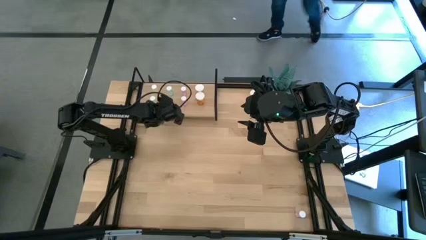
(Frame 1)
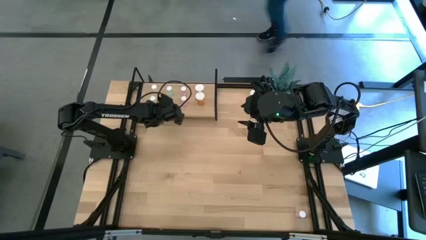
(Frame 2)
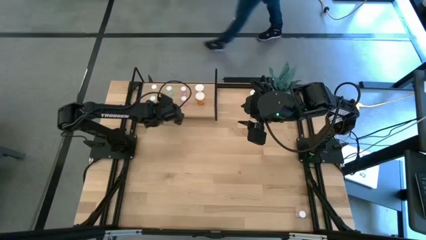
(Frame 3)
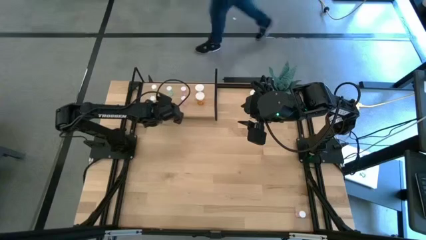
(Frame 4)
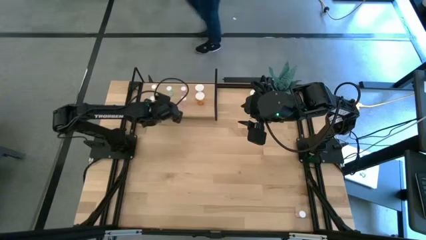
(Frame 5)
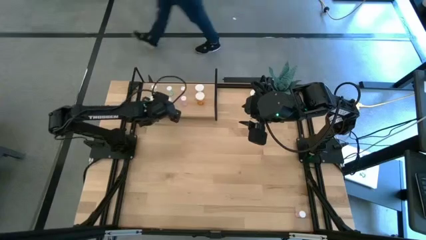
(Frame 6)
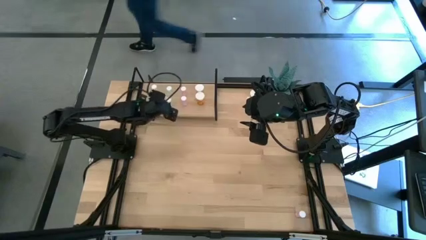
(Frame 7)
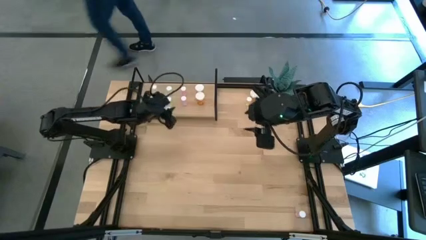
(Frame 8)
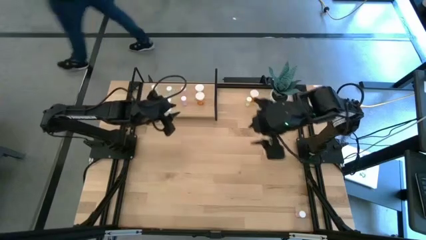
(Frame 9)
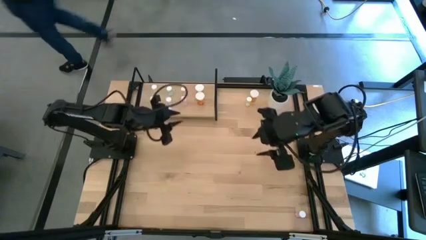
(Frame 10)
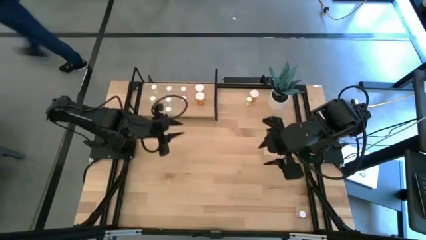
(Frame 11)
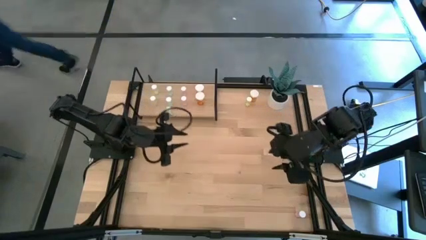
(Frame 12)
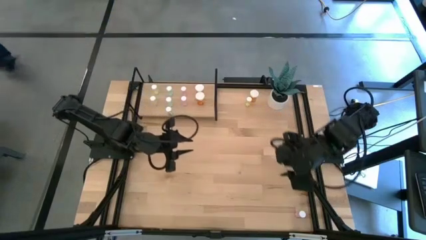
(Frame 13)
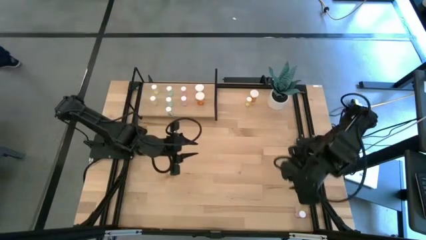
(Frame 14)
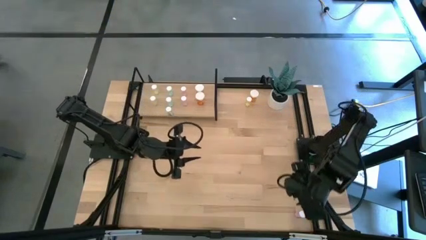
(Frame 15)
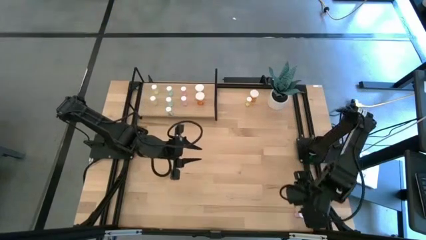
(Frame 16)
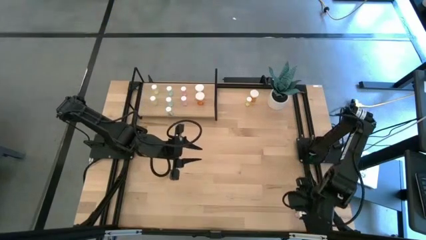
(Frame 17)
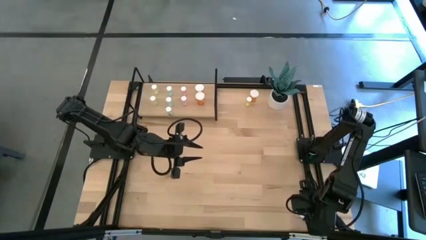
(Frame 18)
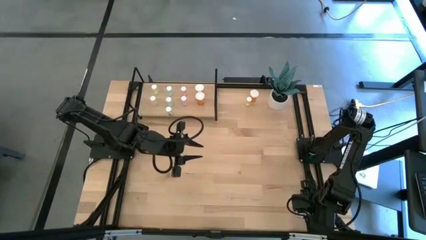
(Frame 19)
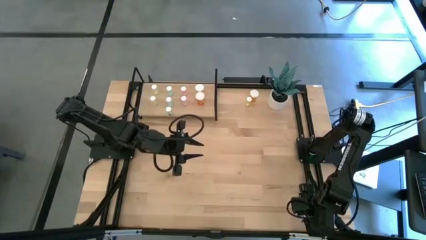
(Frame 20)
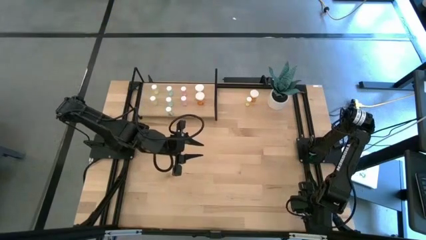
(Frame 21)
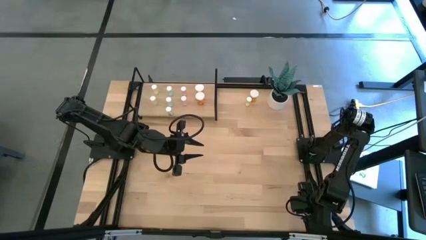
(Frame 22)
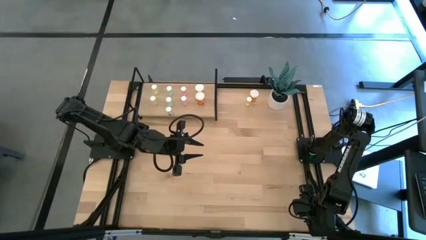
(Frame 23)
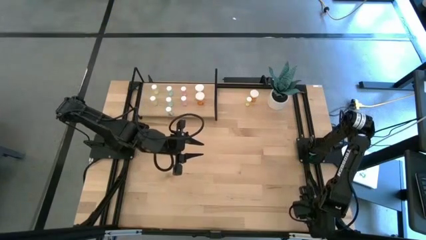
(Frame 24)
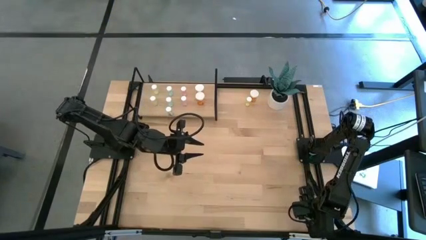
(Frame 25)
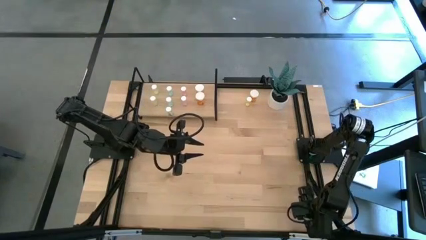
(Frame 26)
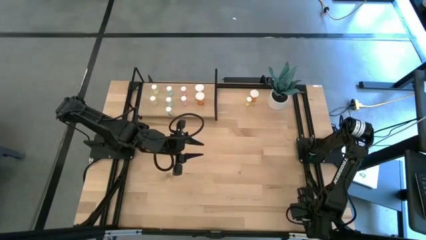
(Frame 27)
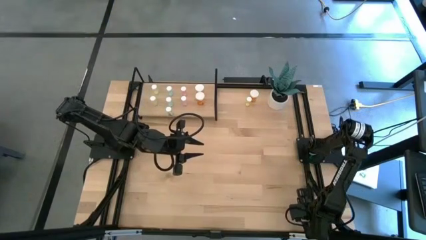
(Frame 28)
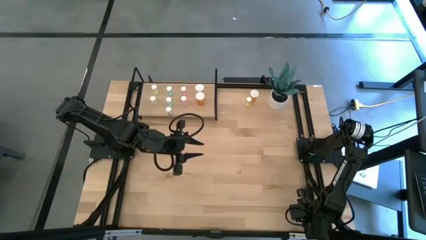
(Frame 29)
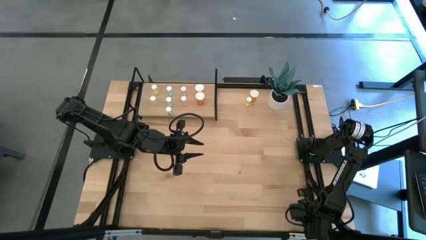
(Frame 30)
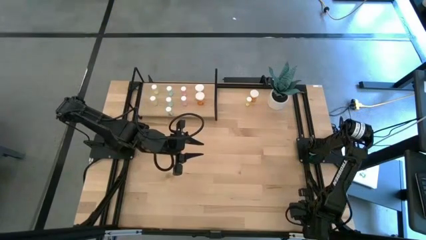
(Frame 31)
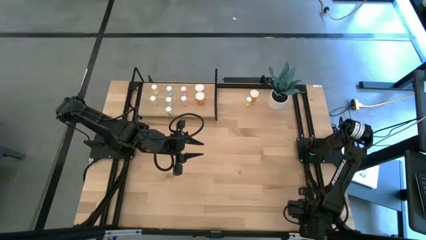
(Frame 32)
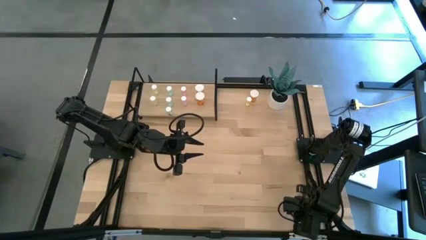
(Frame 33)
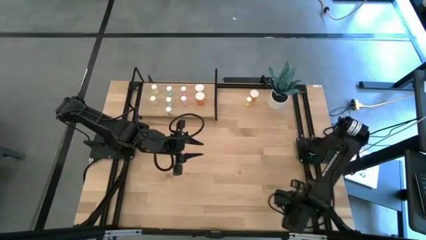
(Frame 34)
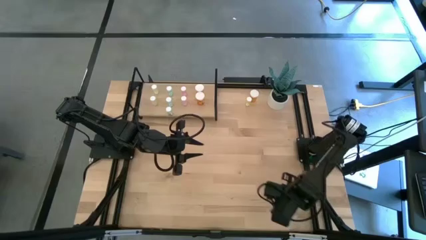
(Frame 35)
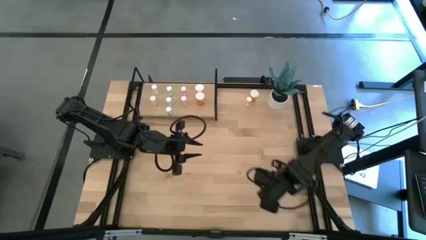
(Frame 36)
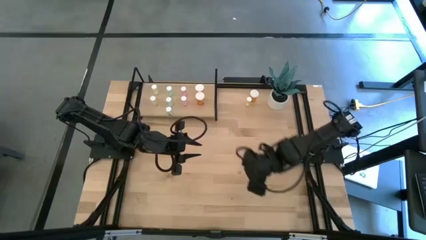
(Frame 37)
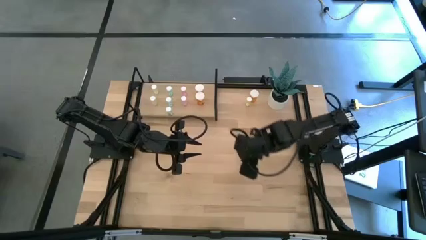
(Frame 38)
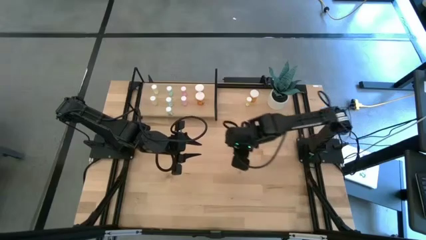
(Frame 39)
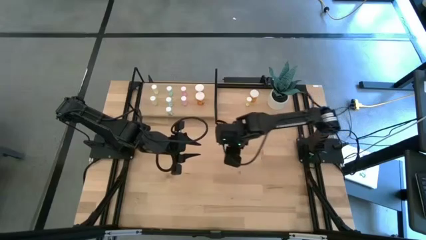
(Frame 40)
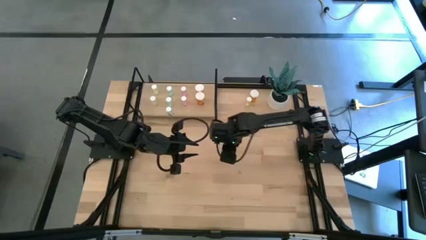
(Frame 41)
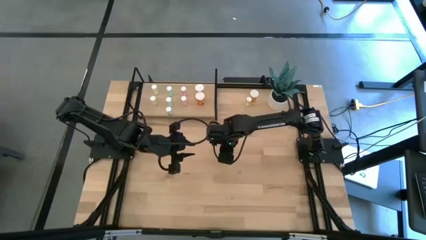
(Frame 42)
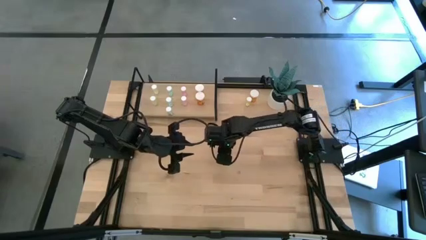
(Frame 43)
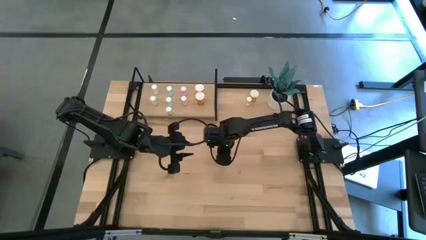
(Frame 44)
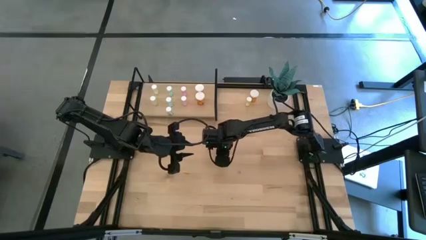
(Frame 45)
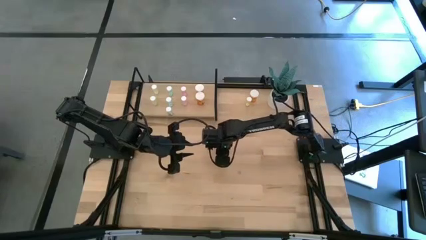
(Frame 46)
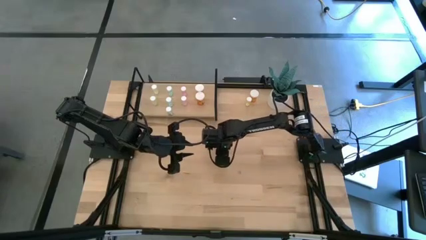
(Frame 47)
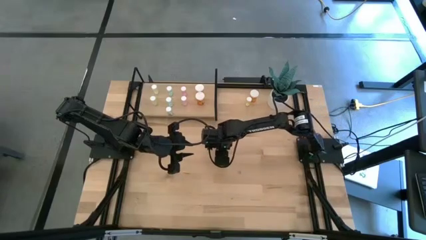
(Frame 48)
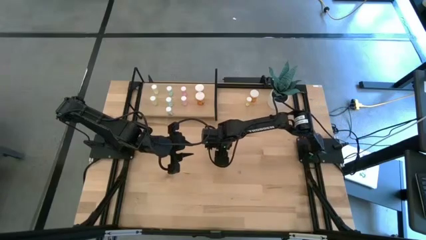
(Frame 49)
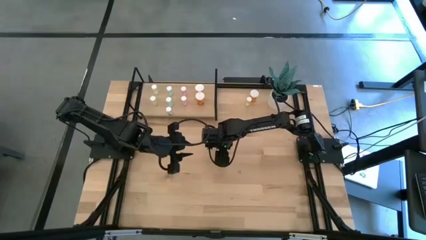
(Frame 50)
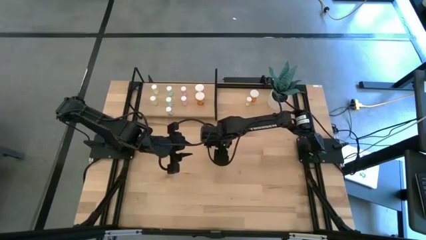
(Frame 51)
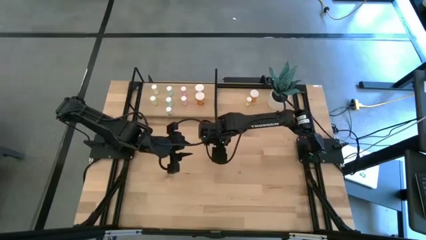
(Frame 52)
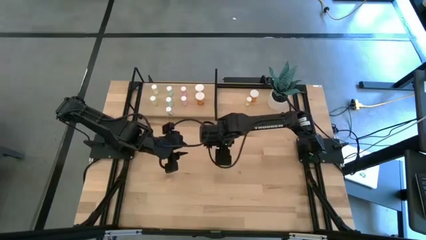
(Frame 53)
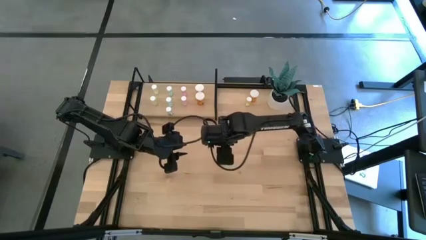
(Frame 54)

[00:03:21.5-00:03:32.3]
Task: Pick and place medicine bottles onto shelf by color
Put the pink pill bottle on the shelf and align it with the other pink pill bottles

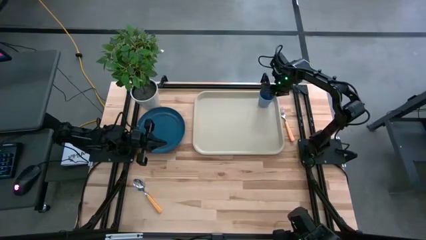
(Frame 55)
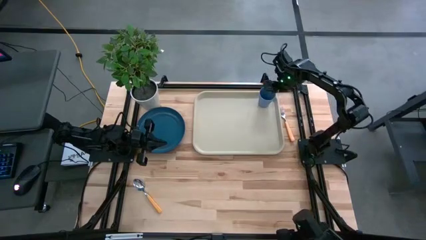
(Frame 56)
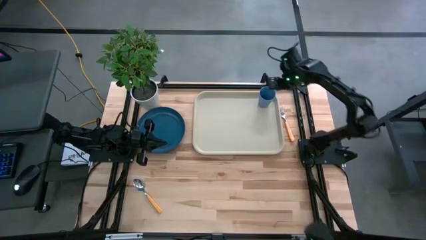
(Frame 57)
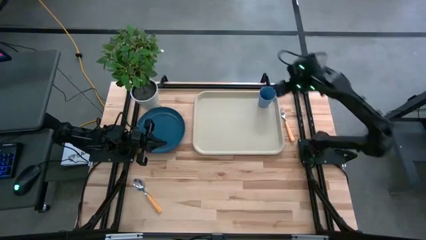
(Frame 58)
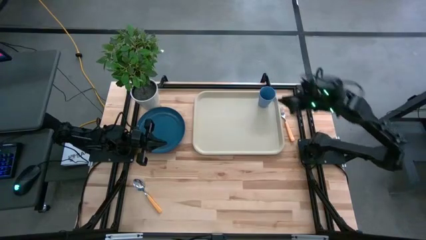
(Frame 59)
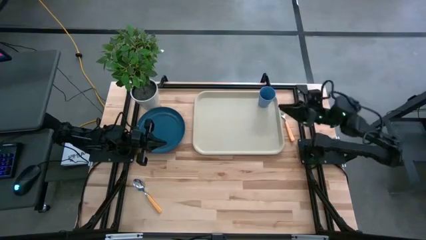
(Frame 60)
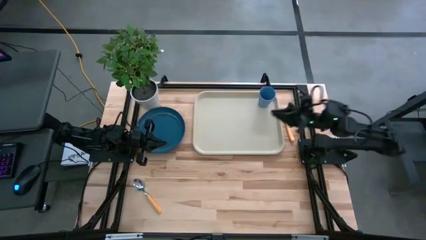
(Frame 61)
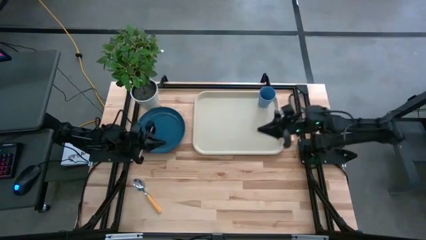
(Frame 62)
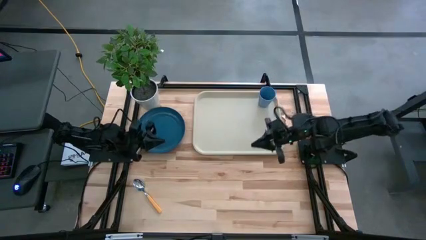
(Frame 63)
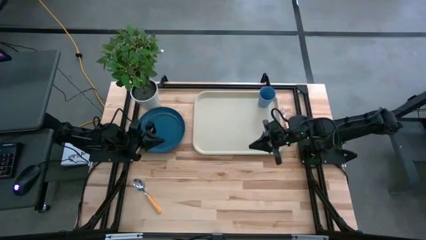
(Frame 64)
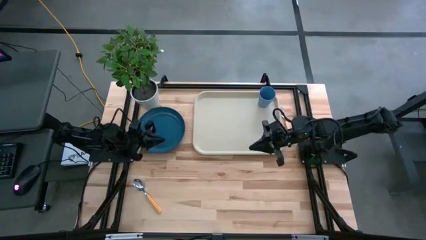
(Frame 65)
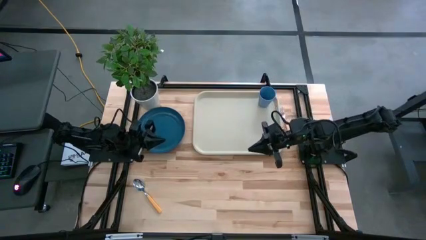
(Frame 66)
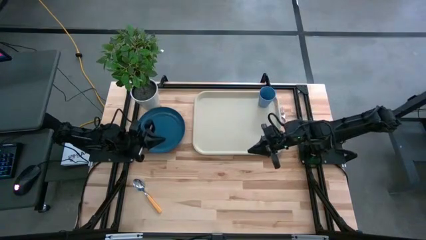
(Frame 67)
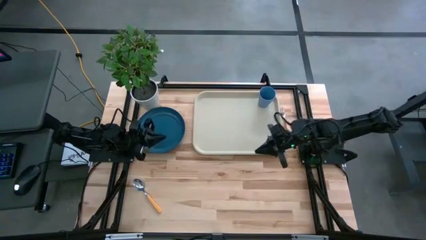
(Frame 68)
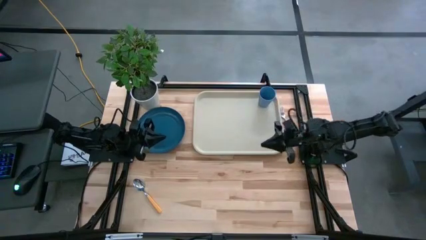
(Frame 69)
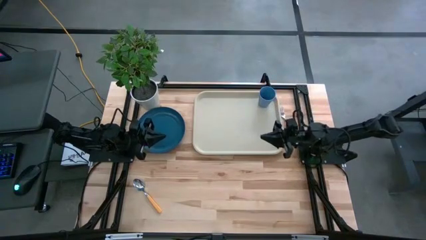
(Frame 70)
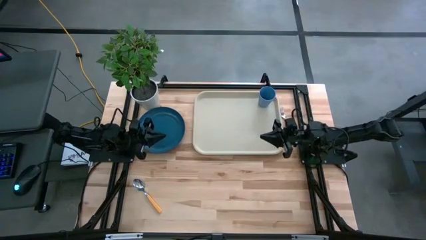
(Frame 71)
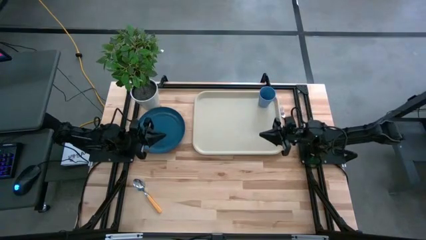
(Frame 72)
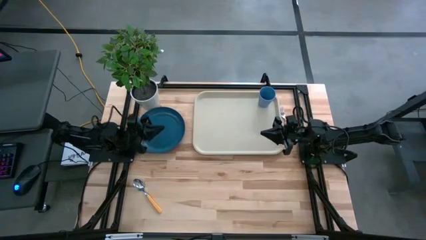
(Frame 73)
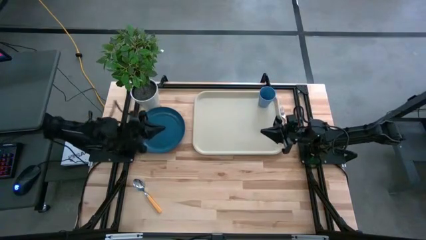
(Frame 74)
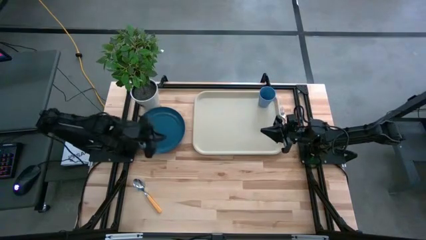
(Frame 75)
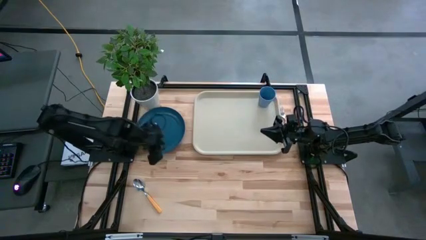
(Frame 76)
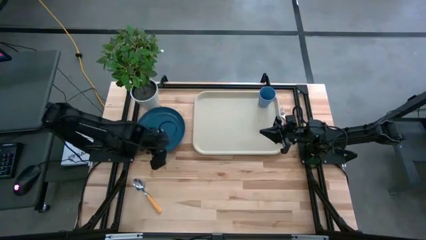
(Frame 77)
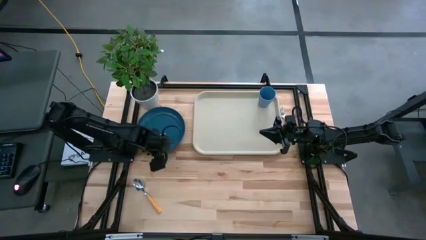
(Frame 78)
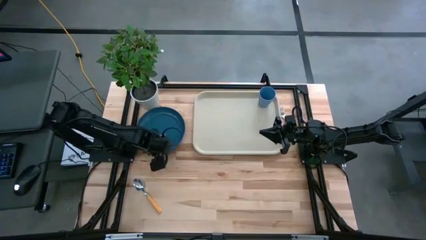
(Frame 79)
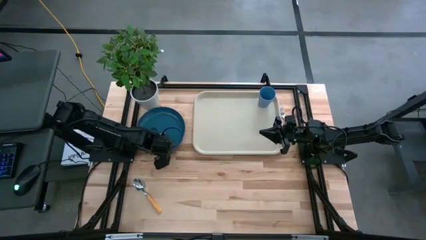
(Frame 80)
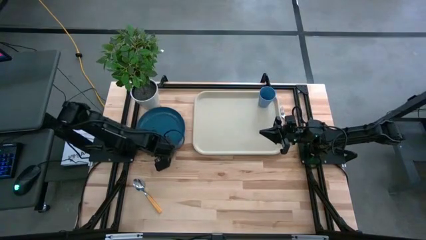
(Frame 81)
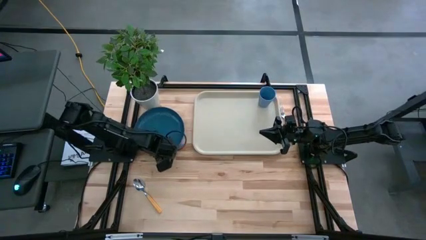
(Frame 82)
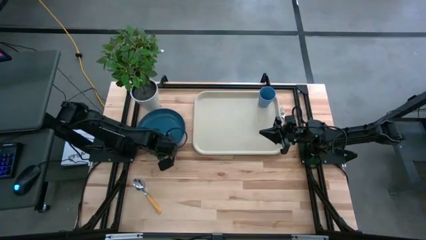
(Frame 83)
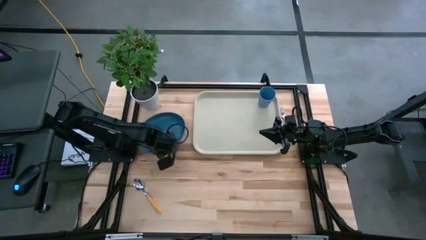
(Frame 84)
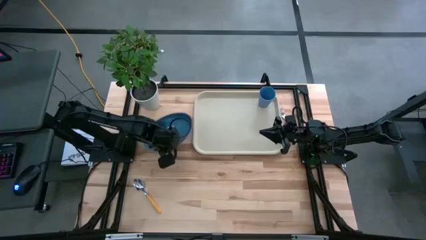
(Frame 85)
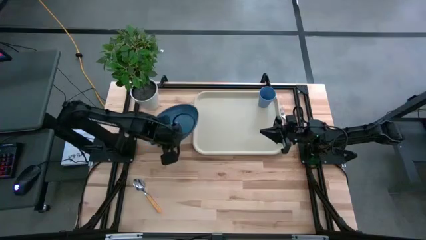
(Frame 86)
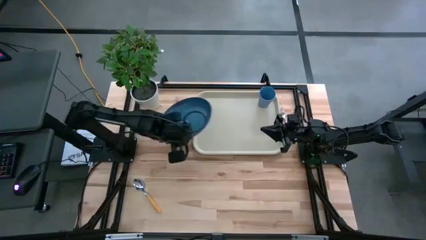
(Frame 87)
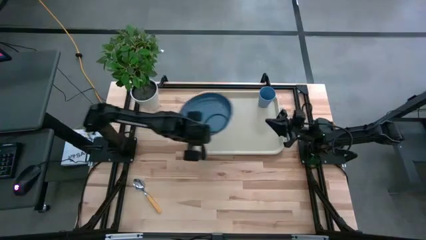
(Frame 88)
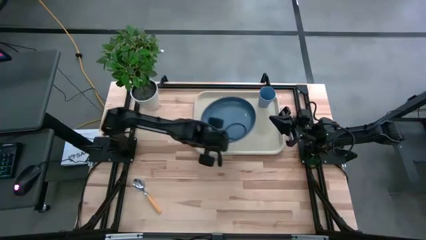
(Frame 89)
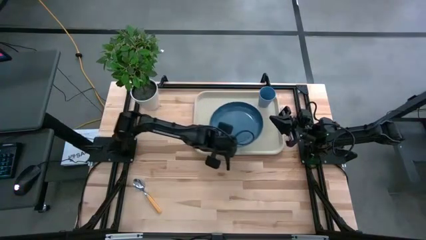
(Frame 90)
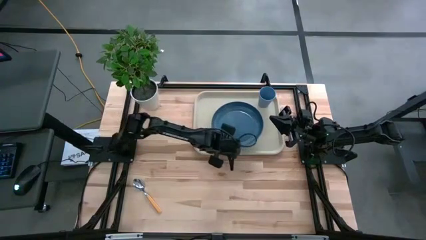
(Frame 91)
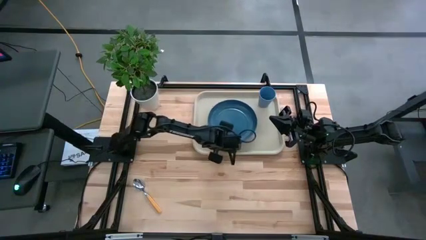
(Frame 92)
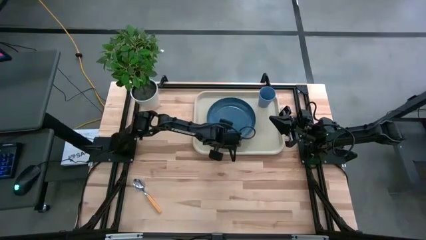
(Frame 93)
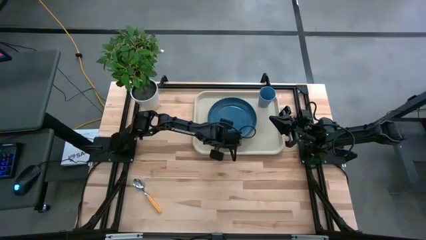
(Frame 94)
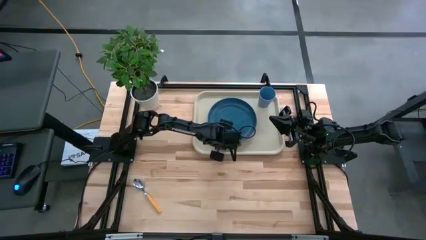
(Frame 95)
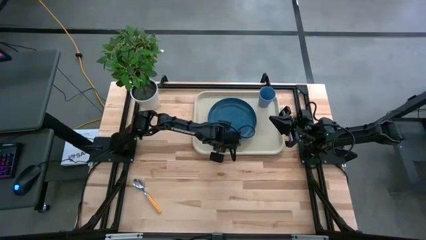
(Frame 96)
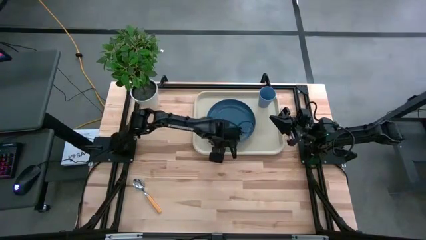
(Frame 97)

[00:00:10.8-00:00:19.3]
Task: Pick and place plate/cup/fork/spoon on tray
Put the blue plate on the gray serving tray to the bottom right of the blue cup
